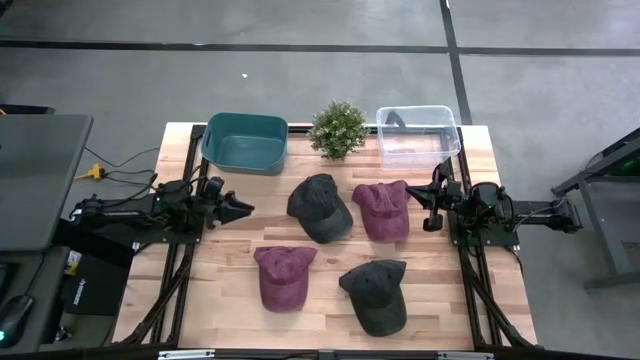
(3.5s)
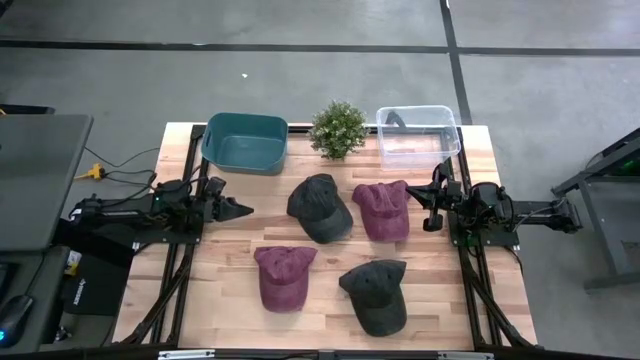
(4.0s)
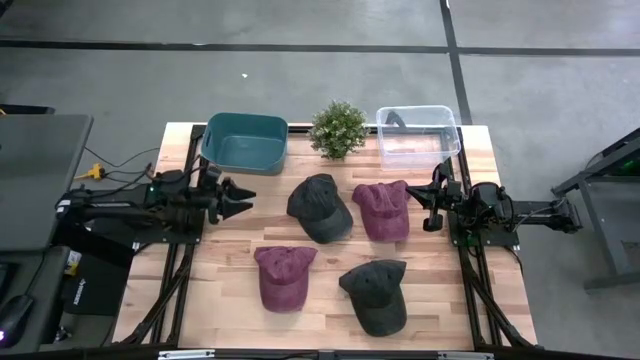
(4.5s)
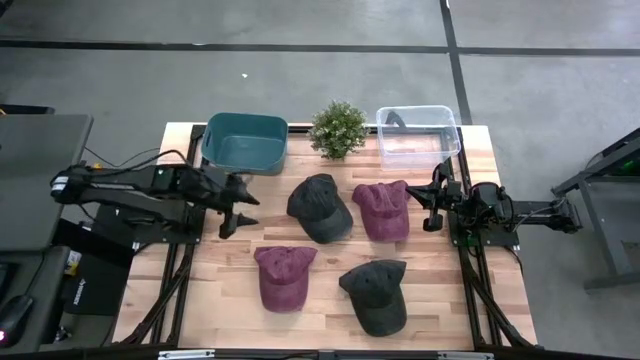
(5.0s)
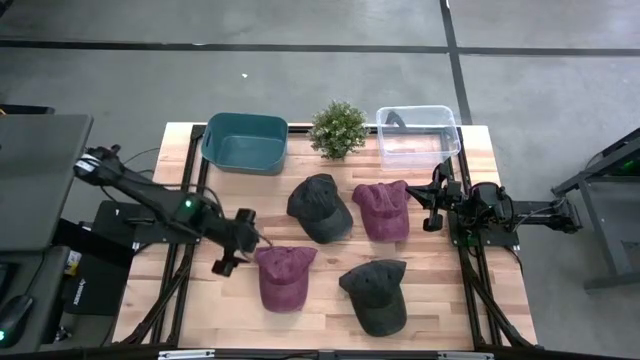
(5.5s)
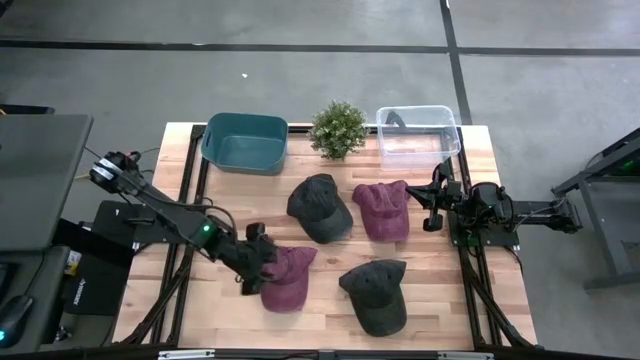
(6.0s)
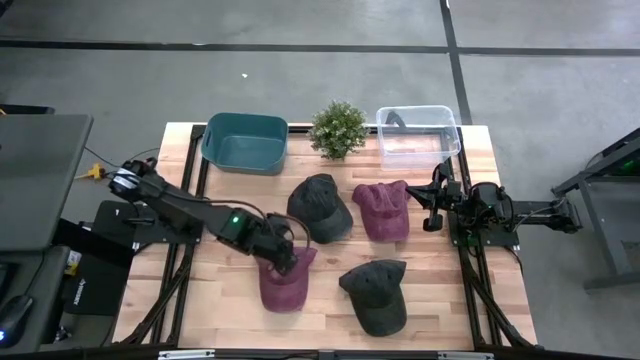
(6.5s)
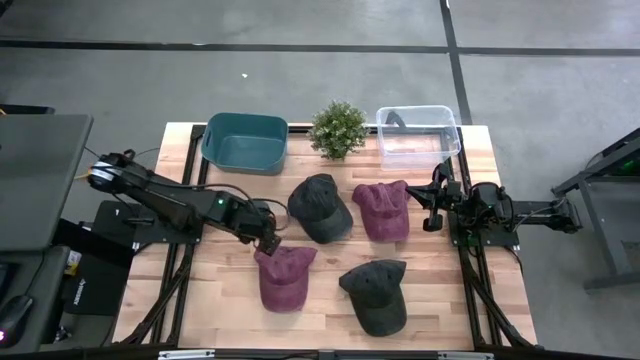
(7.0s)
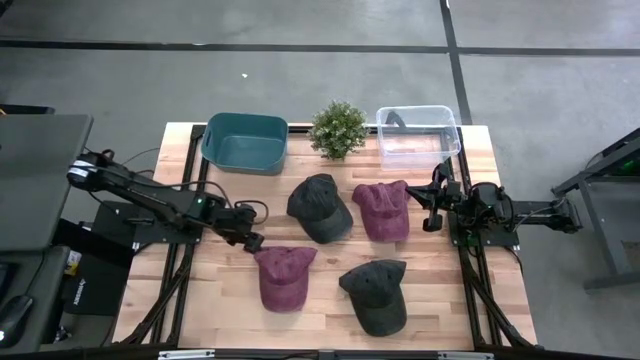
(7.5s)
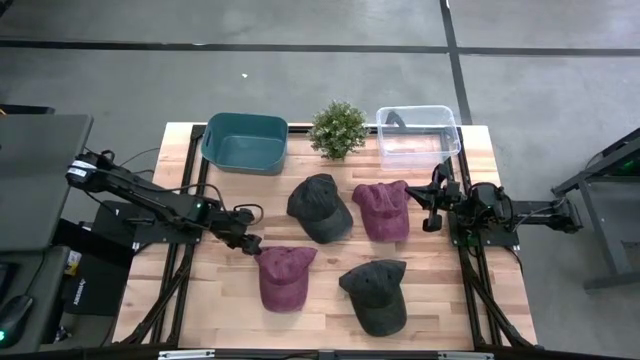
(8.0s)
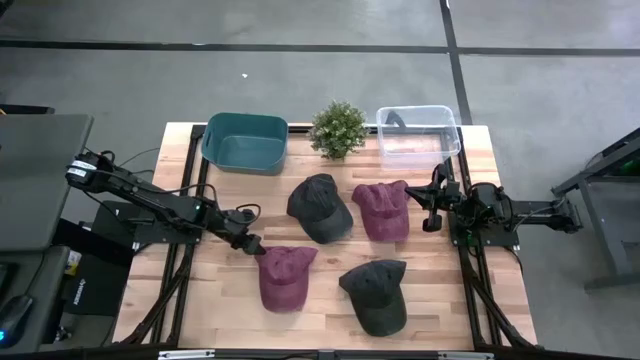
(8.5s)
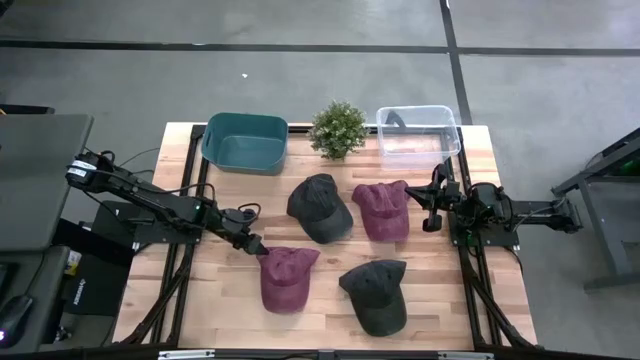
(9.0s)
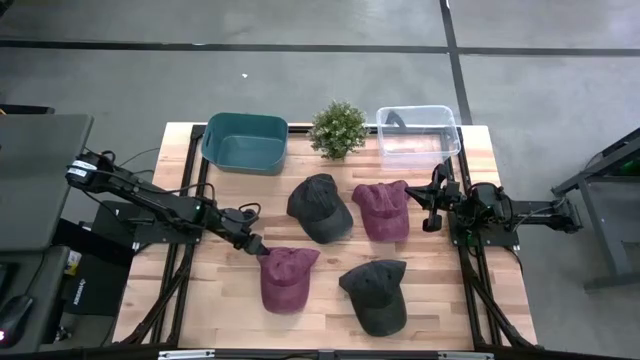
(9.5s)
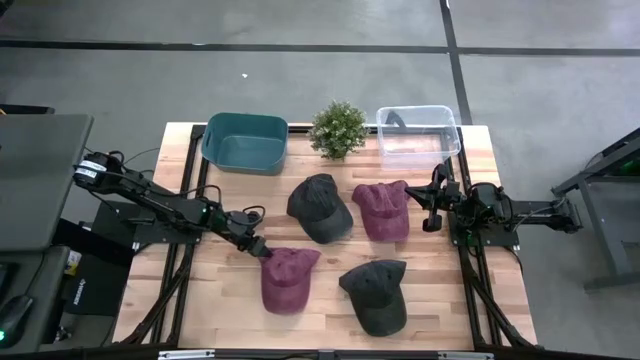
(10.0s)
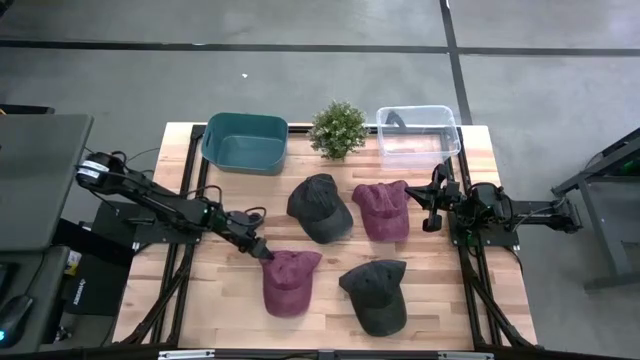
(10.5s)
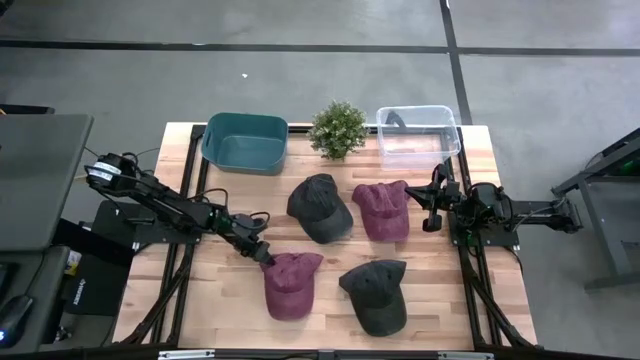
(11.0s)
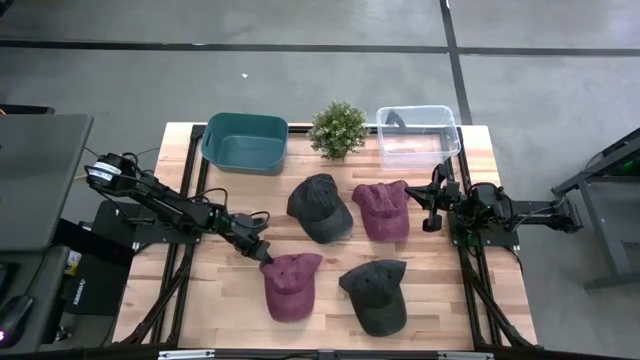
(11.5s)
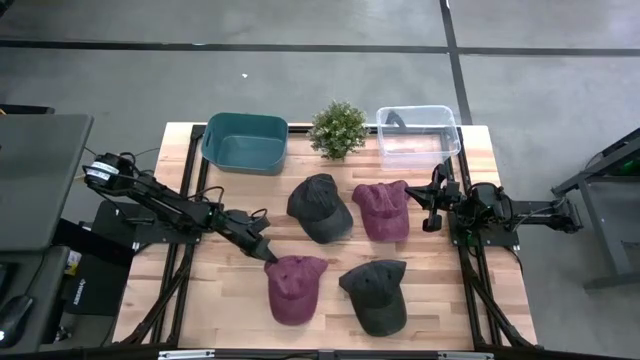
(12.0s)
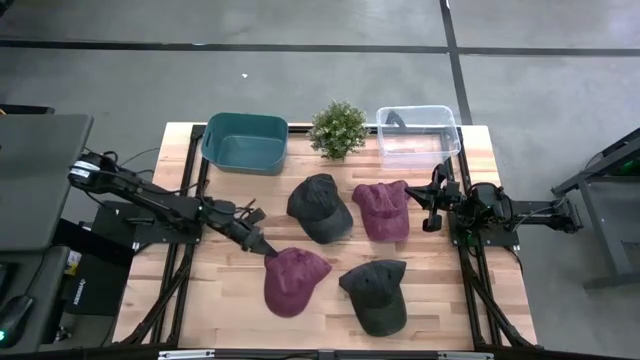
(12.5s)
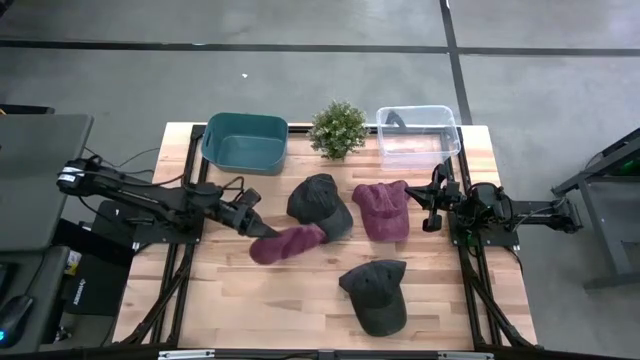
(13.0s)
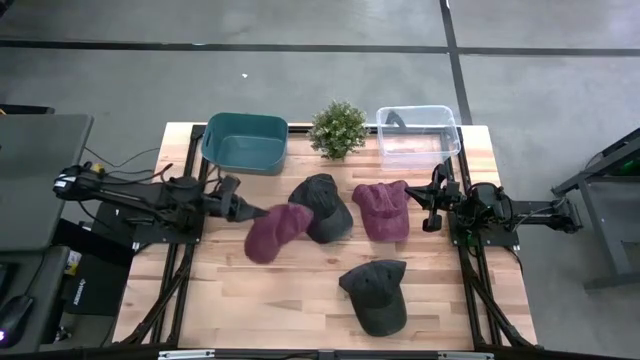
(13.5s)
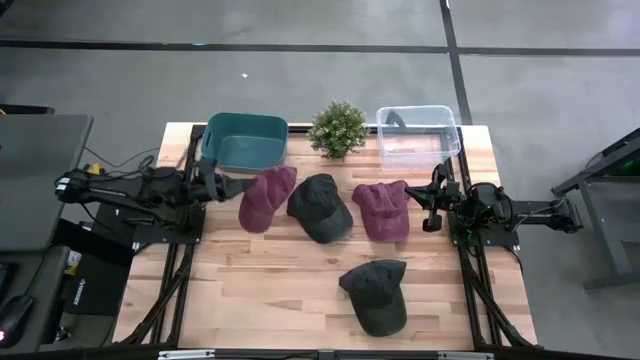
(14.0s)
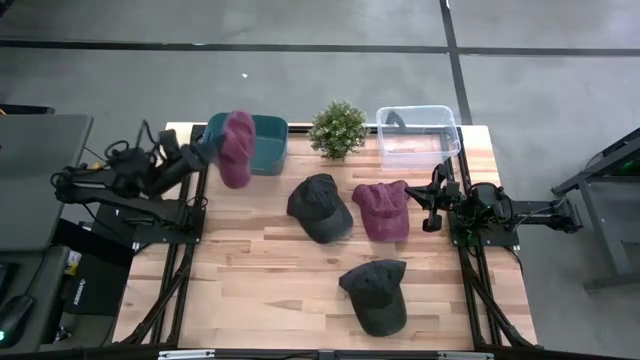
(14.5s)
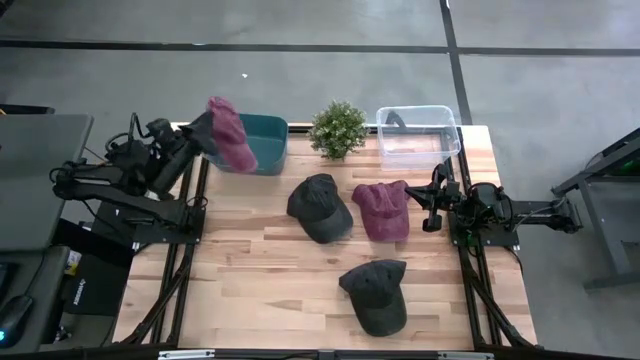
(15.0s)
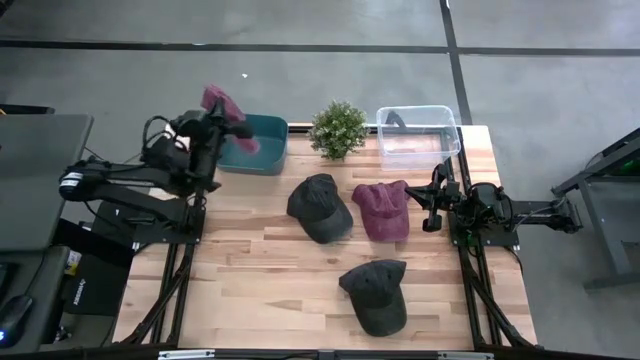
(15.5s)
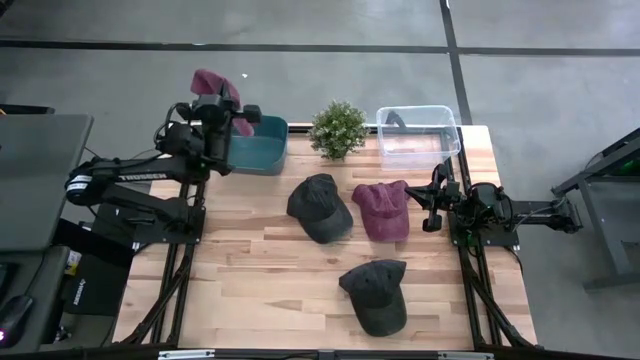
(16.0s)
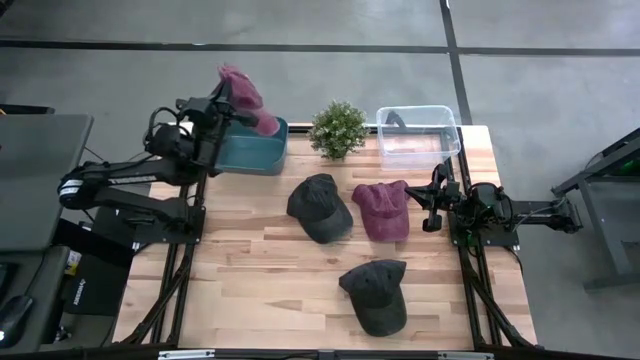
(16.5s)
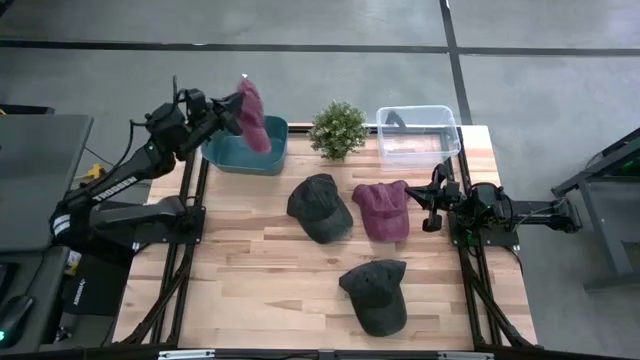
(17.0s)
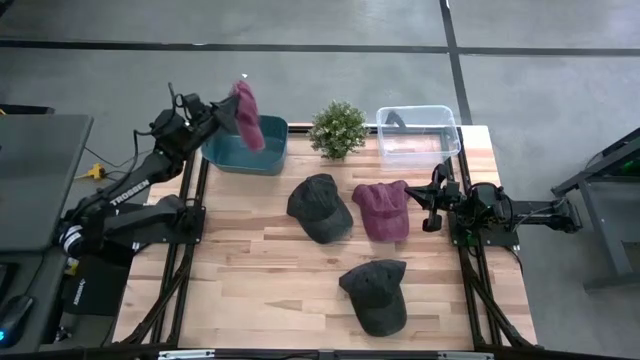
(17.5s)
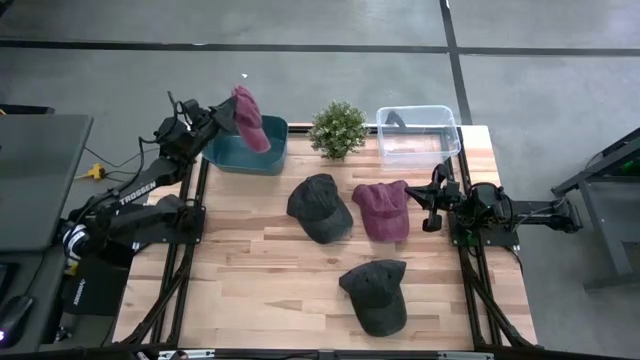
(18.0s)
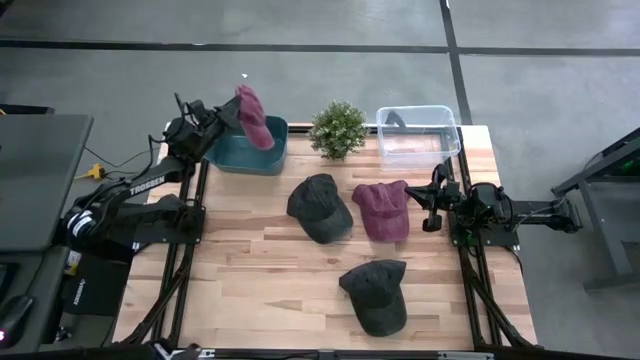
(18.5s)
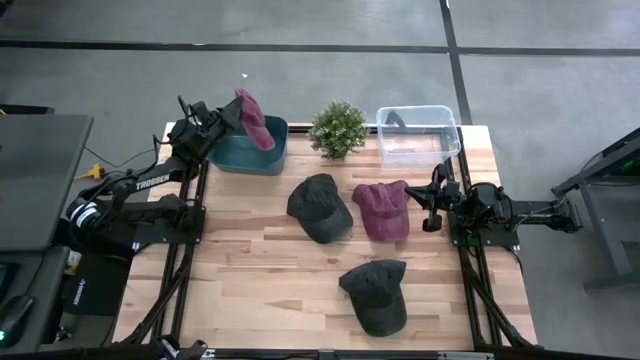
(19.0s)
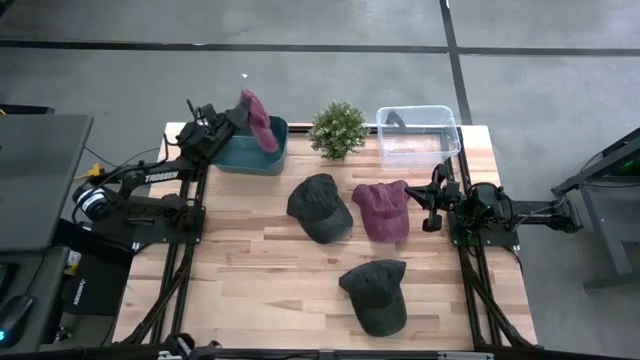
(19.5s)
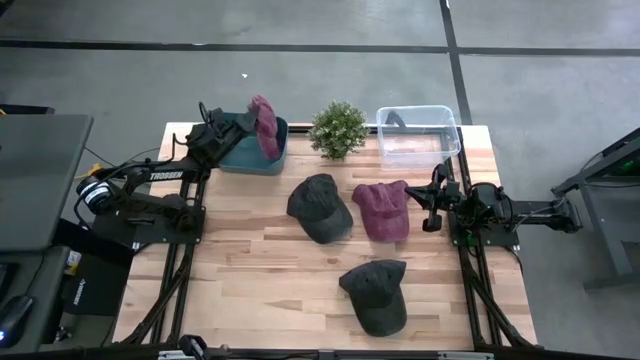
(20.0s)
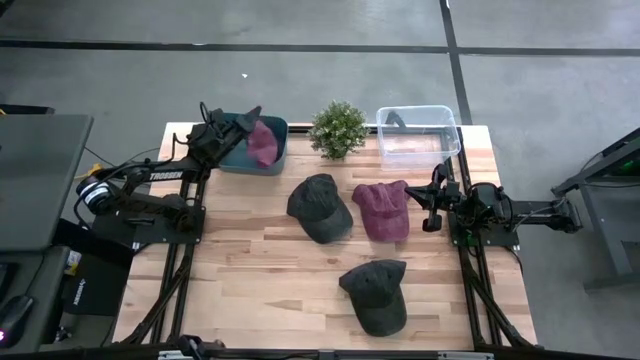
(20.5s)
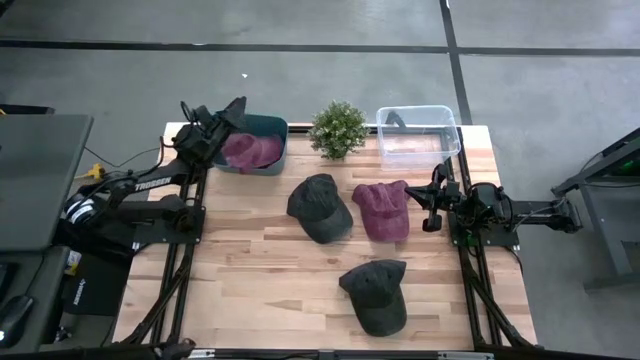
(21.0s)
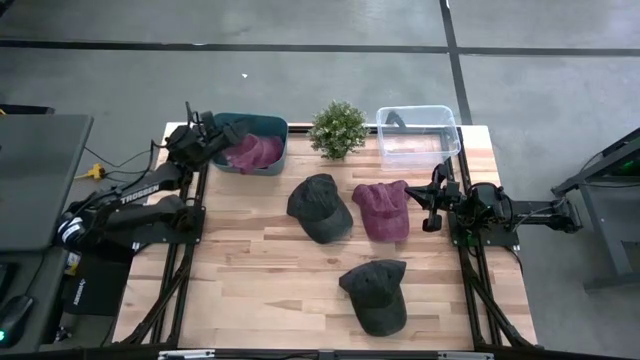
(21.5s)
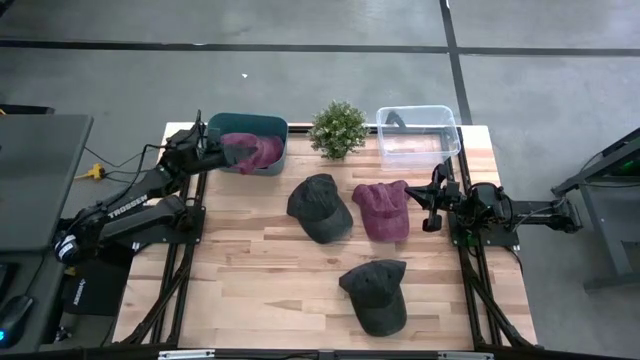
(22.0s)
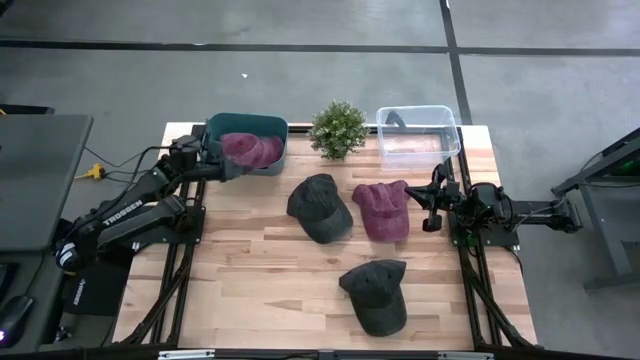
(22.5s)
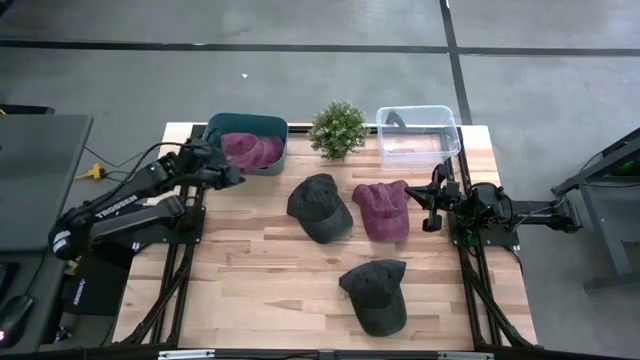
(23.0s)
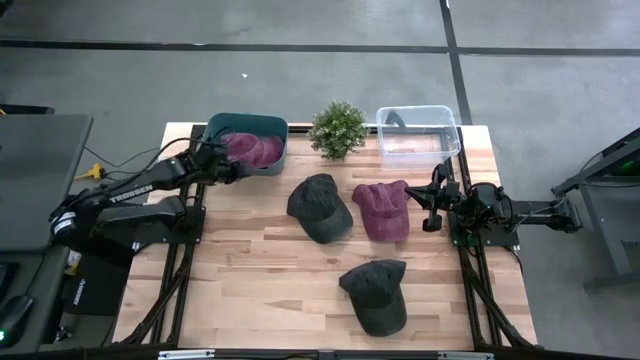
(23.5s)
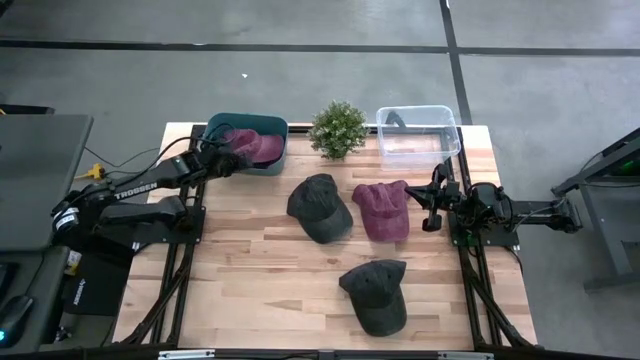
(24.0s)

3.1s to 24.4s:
Task: Pick & Place hat
Put the bottom dark red cap into the blue bin
